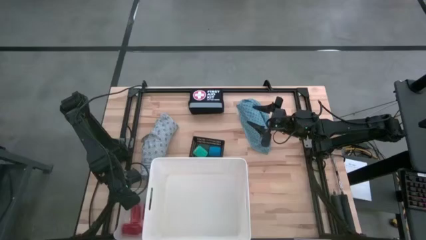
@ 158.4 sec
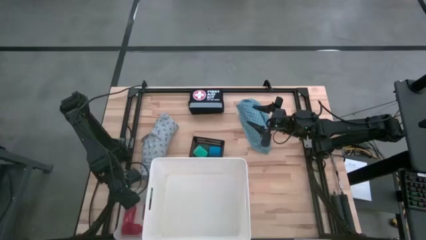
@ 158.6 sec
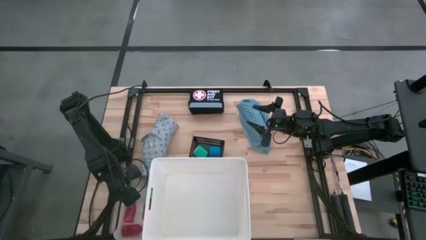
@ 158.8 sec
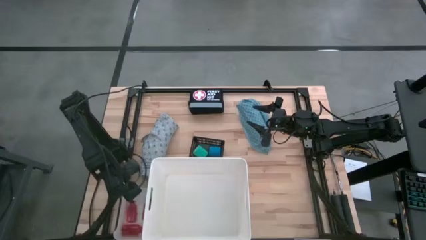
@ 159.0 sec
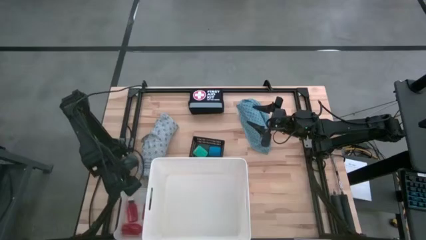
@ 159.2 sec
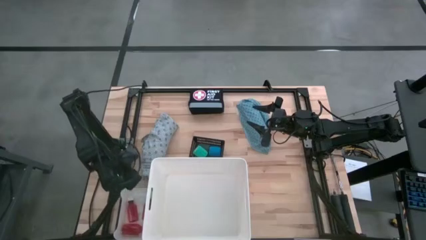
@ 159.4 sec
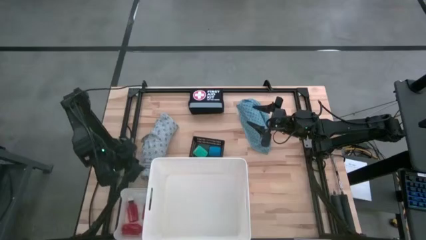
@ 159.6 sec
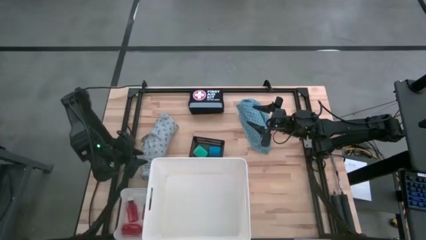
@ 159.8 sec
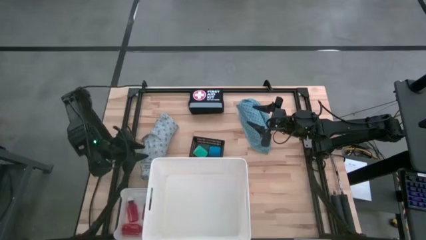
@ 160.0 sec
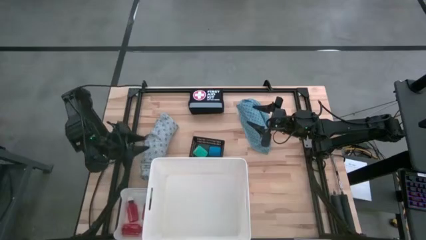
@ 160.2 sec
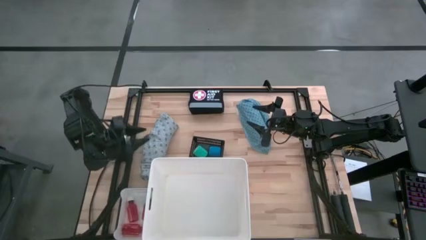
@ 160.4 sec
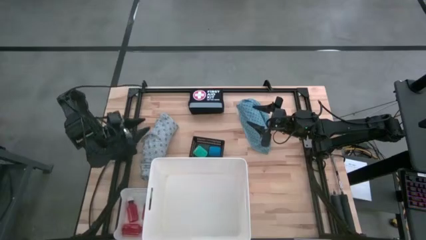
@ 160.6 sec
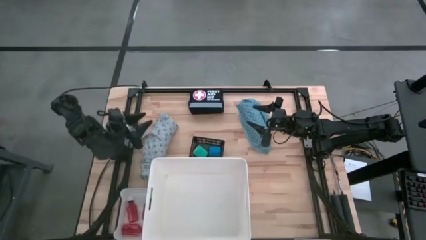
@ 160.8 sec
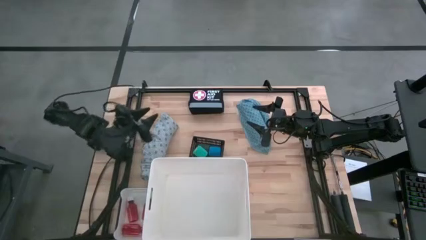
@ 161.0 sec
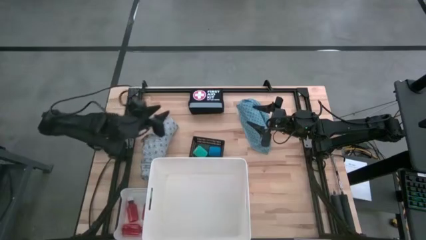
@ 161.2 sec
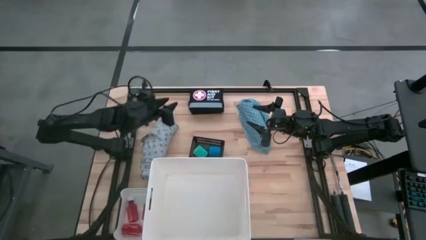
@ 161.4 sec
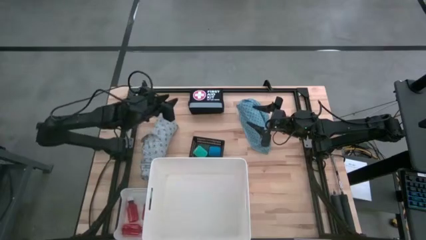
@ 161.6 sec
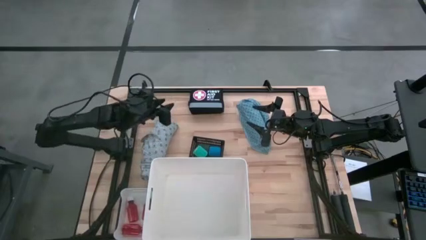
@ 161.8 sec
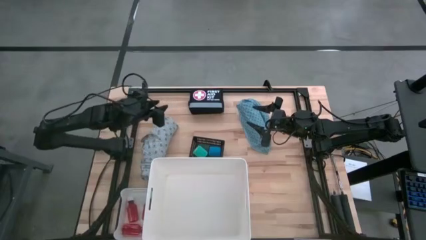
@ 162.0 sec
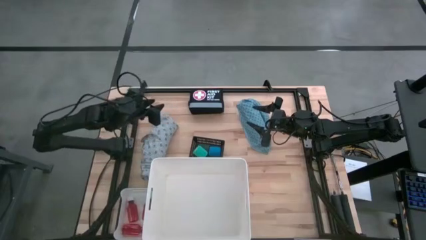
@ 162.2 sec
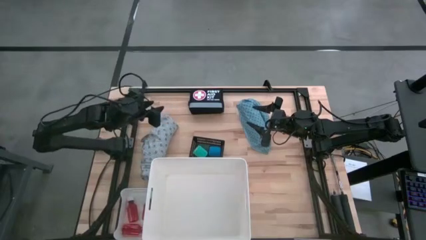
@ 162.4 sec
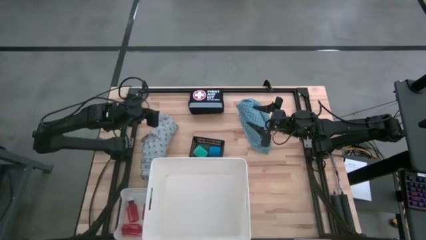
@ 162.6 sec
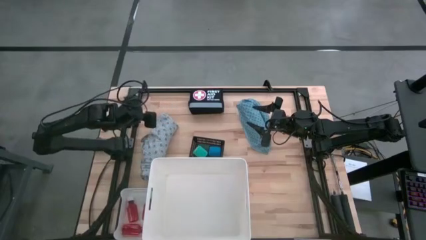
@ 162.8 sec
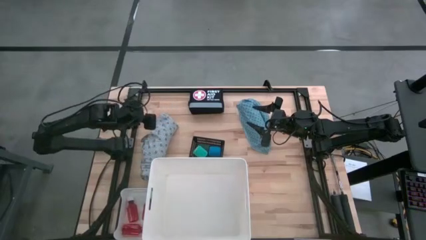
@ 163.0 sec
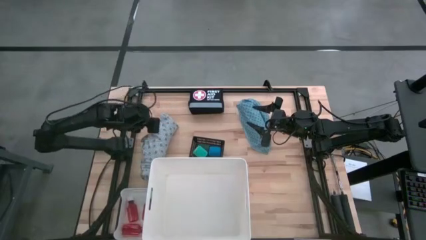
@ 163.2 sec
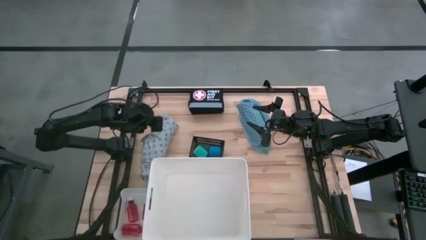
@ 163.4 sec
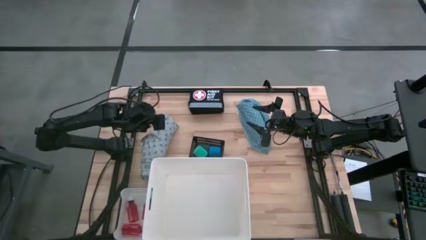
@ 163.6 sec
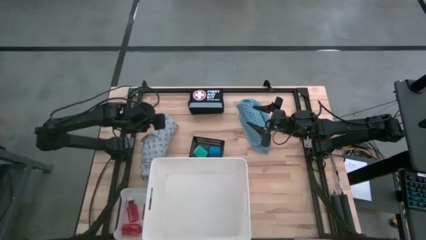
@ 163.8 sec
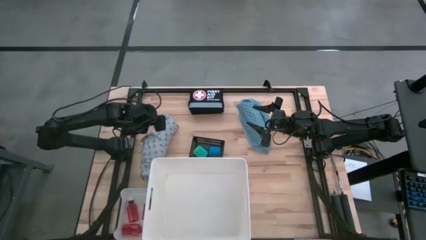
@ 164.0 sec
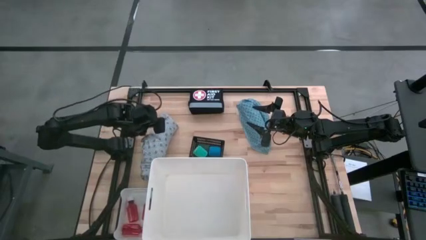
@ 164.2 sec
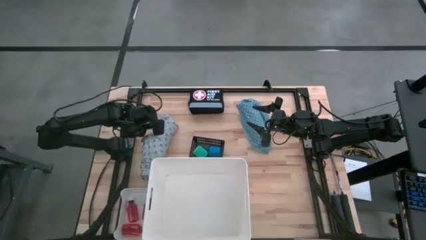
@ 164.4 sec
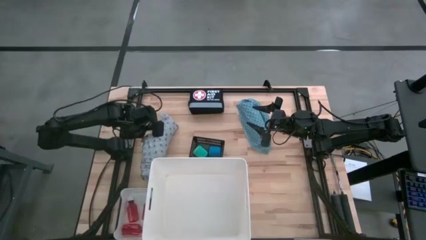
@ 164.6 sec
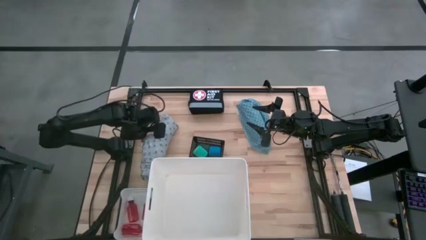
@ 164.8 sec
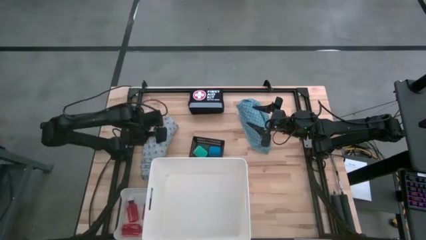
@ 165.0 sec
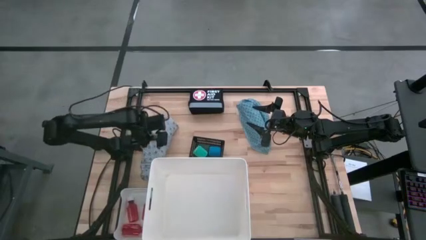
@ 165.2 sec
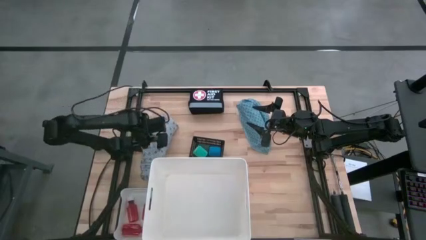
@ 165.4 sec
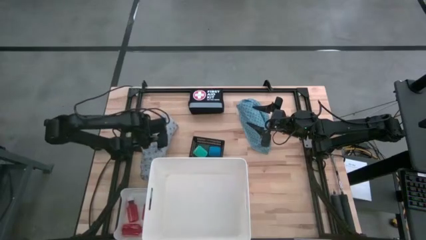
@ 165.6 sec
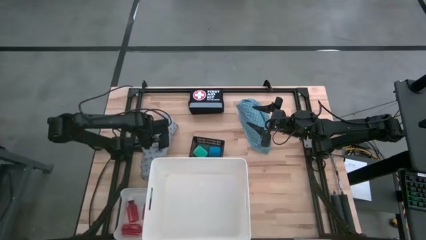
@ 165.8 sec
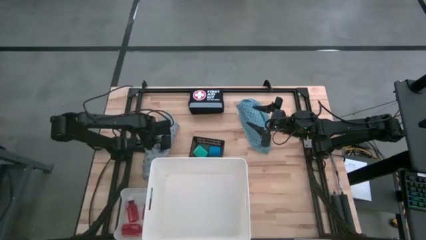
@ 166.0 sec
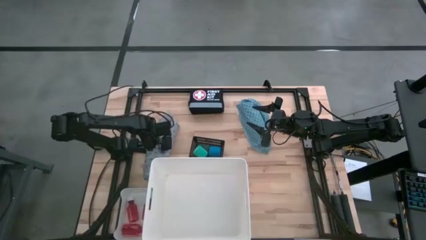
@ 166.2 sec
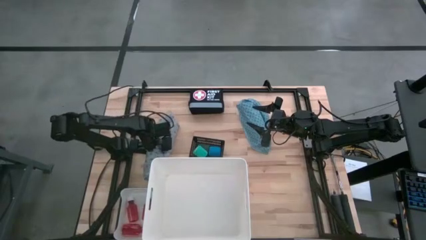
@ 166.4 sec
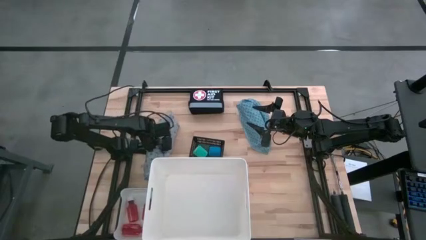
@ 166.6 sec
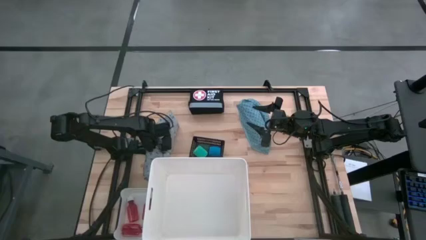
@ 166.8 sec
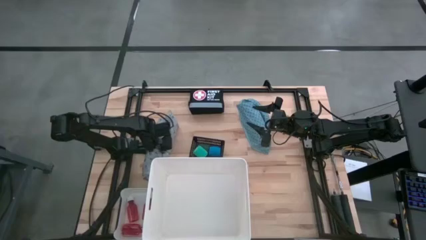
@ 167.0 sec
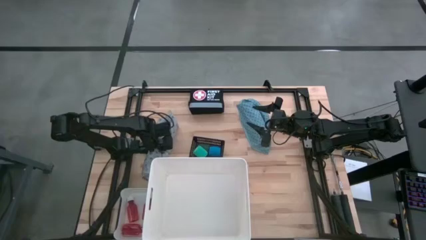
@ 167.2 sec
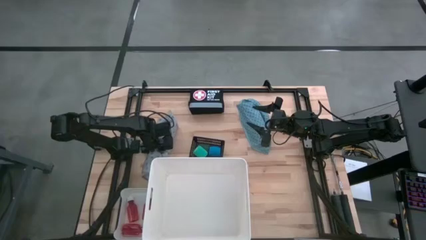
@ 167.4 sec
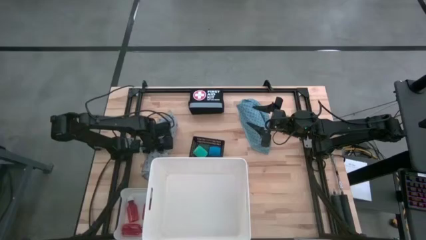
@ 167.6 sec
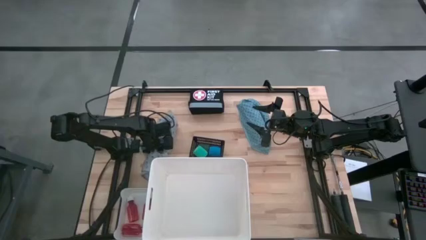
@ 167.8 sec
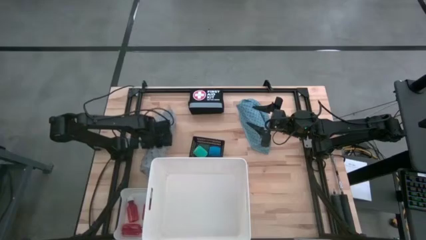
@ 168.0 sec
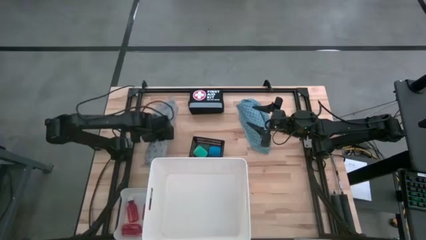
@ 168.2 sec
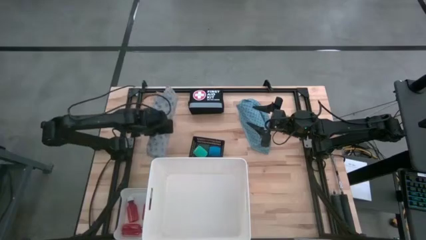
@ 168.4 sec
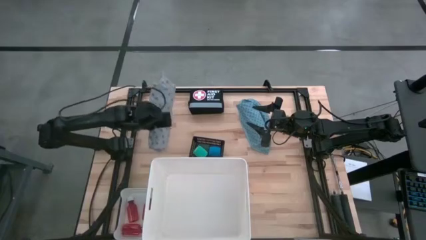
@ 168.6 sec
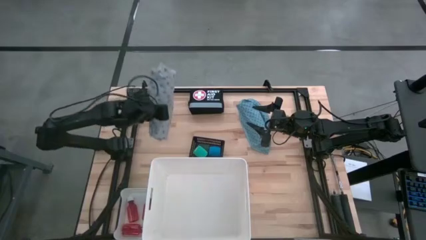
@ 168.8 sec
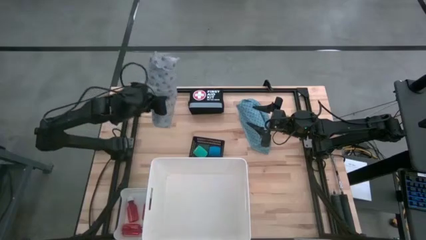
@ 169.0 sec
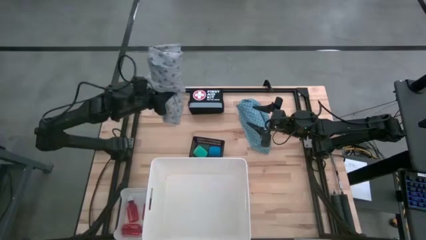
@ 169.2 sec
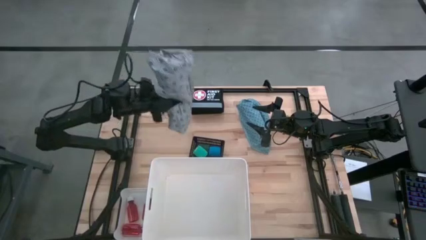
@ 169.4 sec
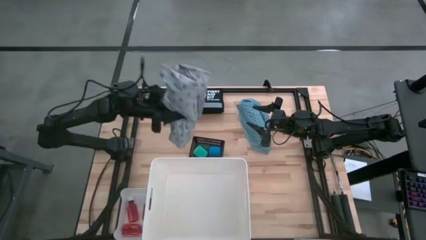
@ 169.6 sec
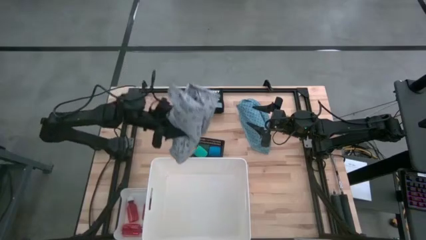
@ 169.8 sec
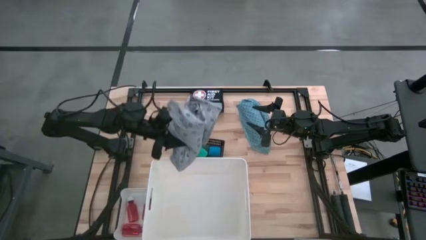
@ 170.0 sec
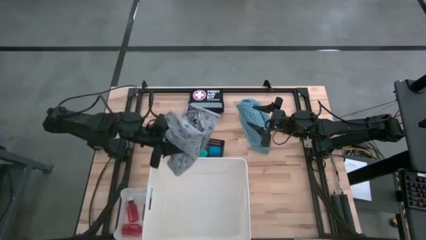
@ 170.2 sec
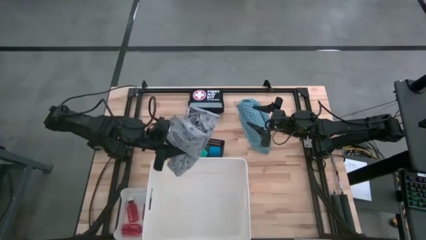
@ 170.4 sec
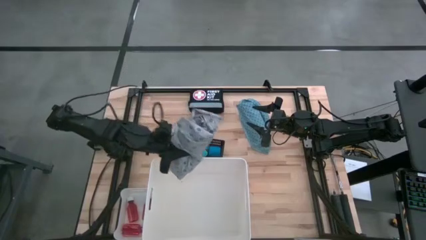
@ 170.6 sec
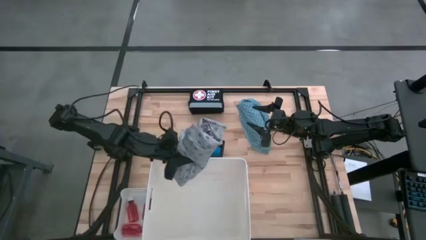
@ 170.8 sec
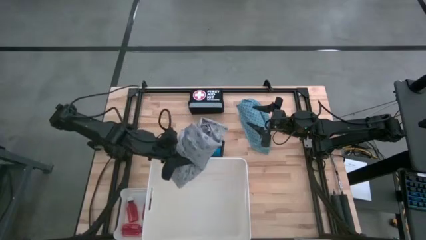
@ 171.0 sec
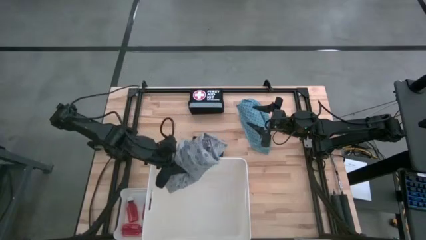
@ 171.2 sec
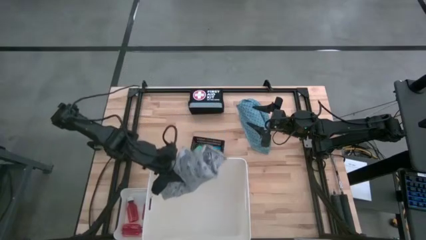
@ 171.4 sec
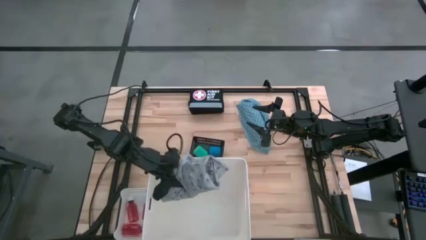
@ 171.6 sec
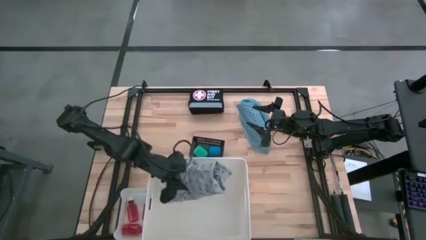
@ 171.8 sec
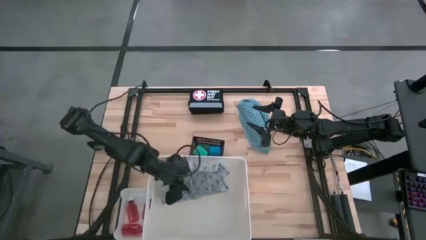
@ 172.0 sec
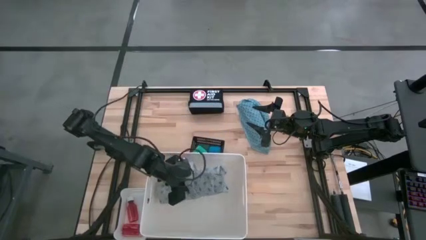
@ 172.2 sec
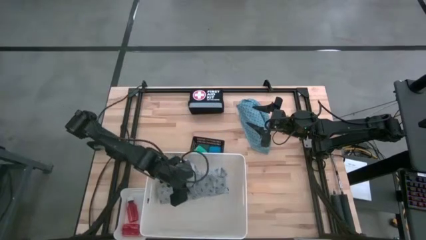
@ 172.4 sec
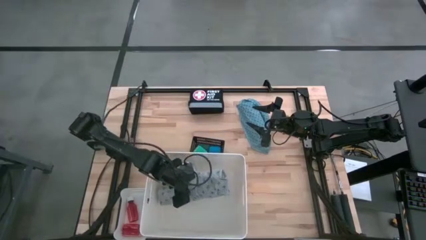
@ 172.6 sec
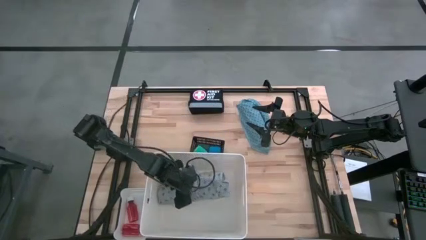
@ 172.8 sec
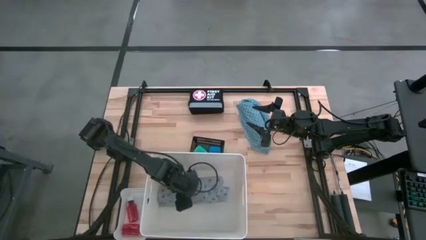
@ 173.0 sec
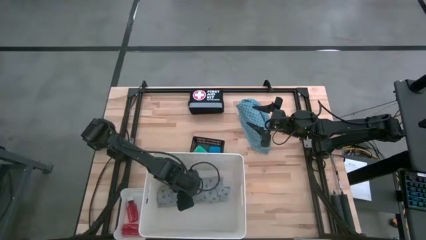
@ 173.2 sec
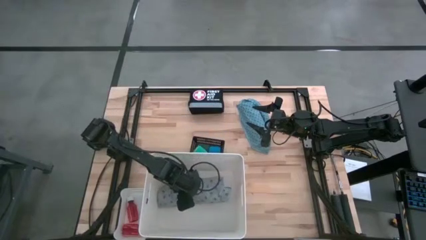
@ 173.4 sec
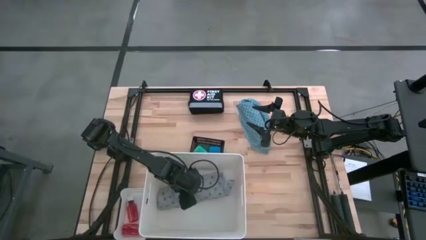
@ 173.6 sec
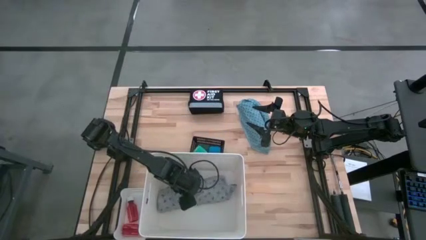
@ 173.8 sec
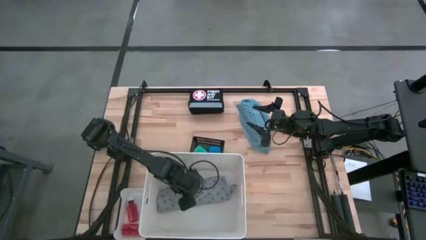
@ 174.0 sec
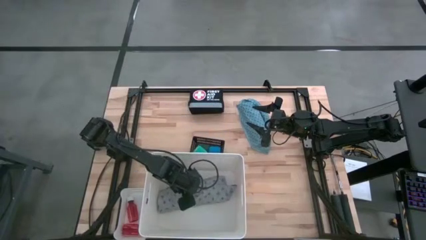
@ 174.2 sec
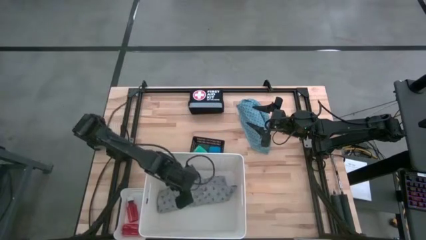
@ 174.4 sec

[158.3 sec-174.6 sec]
Task: Pick & Place Medicine items
Put the gray patient gown into the large white bin

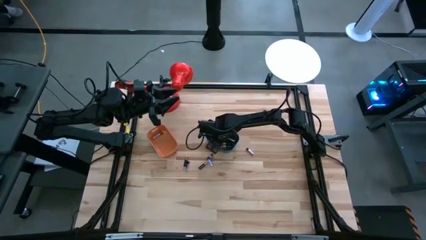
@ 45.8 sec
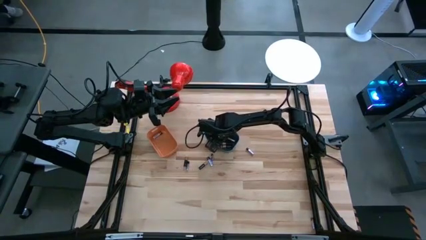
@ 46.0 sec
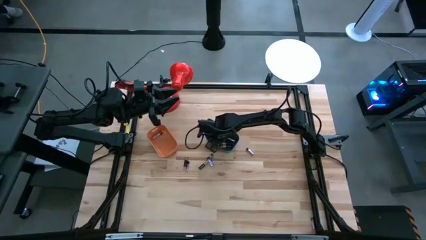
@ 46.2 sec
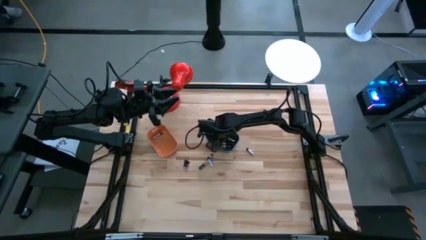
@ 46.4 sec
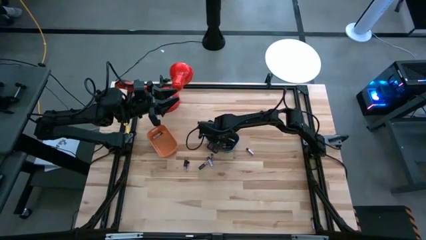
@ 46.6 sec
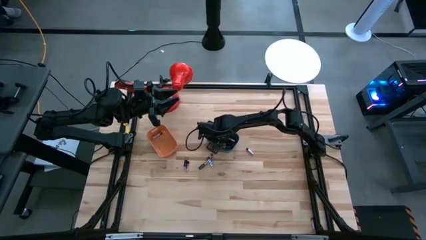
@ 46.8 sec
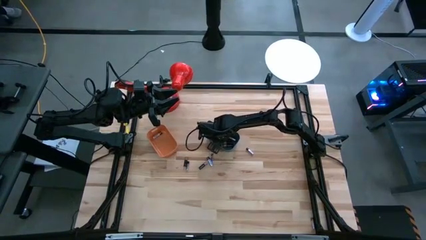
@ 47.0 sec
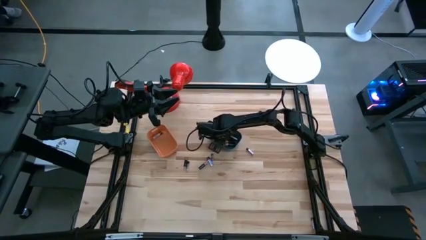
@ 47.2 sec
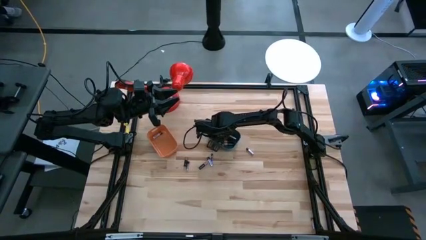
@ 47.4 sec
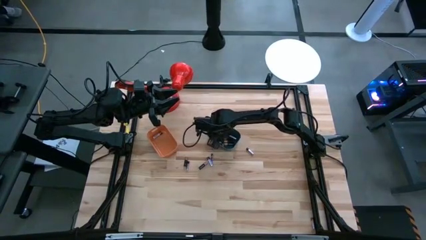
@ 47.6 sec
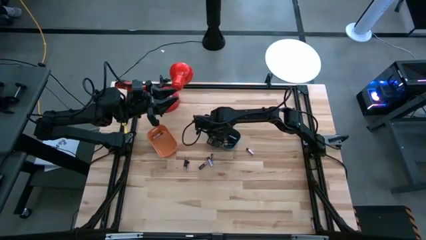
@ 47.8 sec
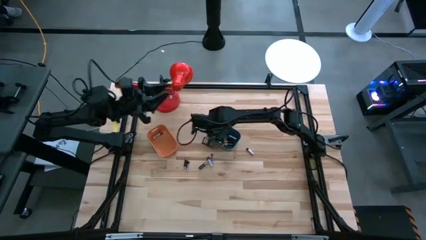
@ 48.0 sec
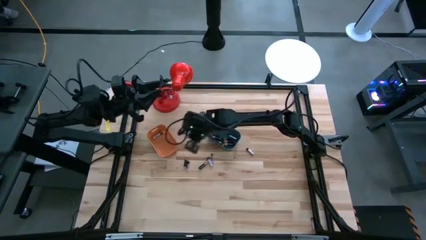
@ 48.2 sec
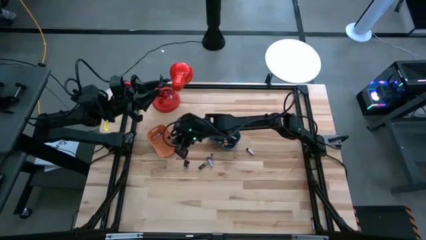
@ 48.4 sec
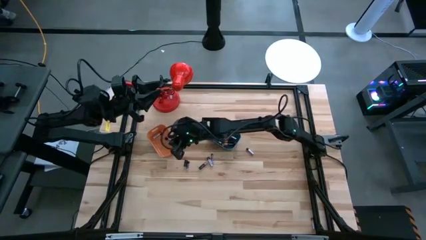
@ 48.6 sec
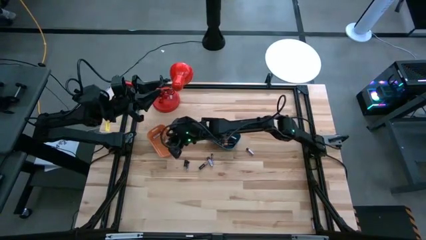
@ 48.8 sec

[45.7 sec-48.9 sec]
Task: Sort batteries
Put the silver battery from the blue bin into the orange bin
